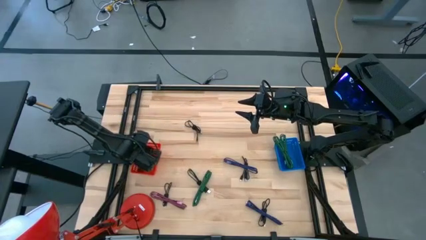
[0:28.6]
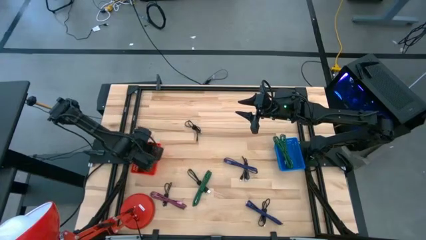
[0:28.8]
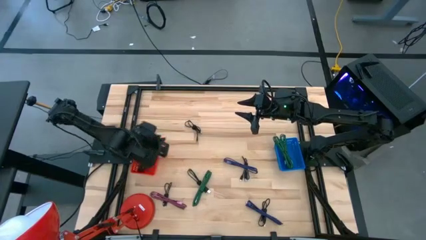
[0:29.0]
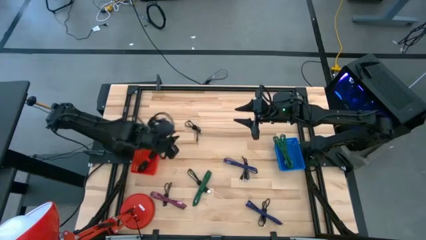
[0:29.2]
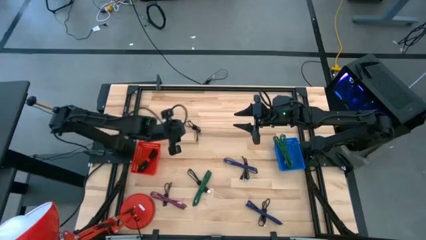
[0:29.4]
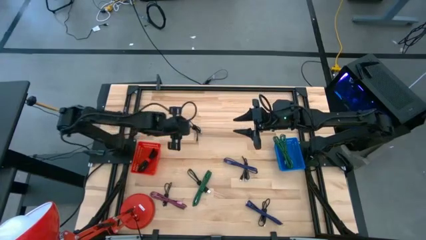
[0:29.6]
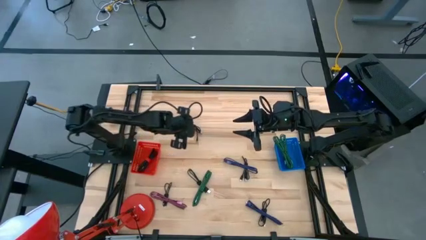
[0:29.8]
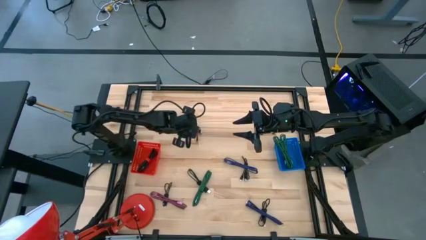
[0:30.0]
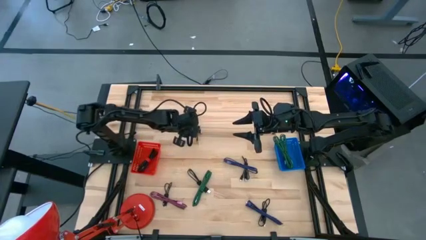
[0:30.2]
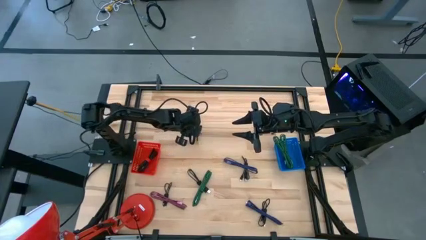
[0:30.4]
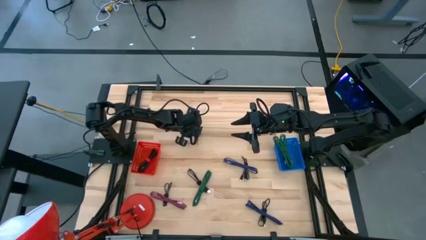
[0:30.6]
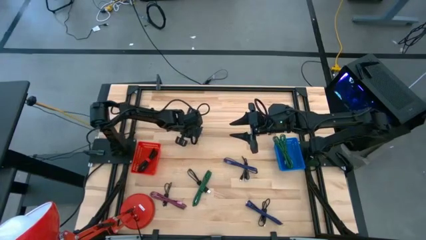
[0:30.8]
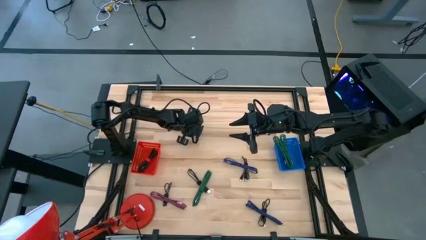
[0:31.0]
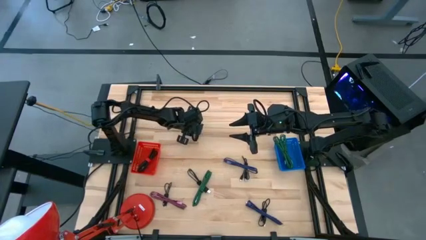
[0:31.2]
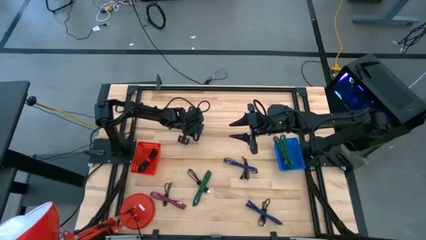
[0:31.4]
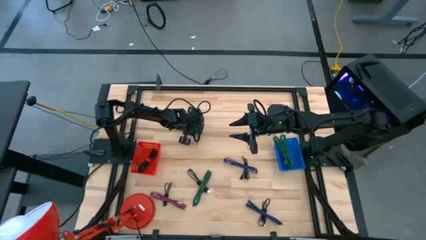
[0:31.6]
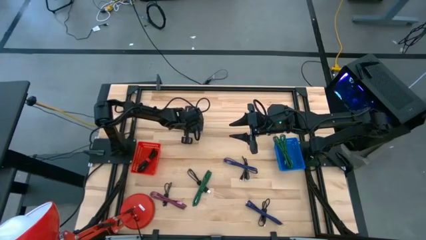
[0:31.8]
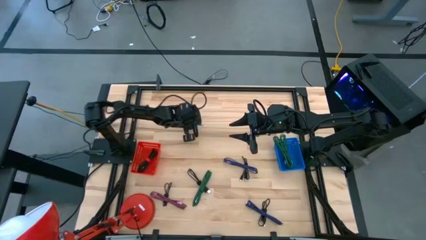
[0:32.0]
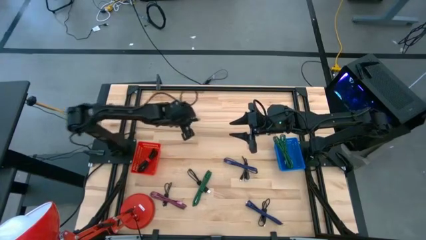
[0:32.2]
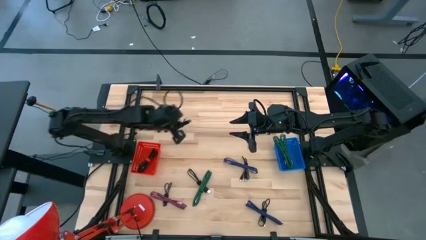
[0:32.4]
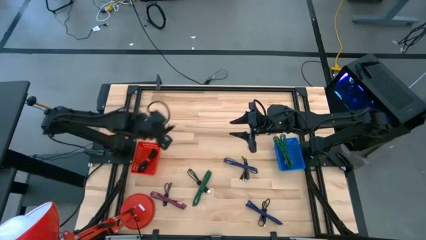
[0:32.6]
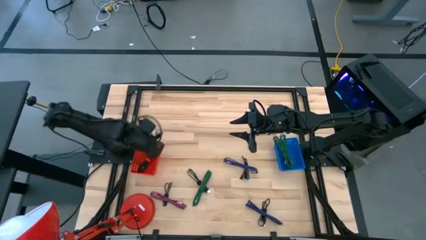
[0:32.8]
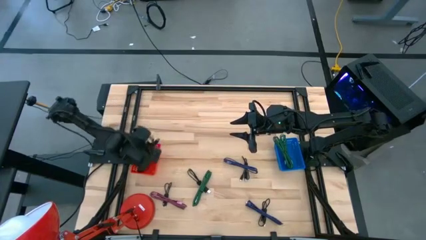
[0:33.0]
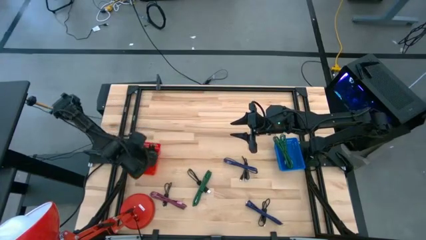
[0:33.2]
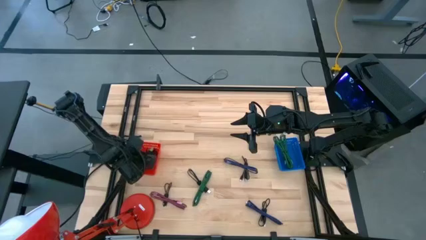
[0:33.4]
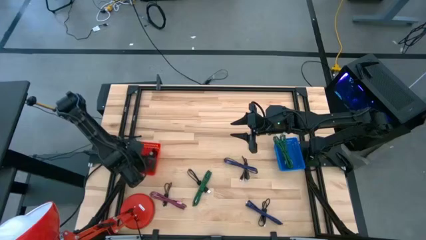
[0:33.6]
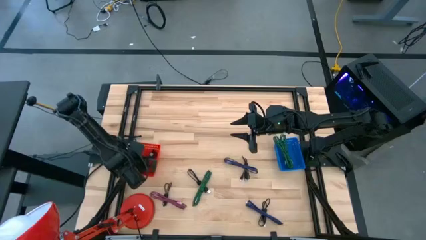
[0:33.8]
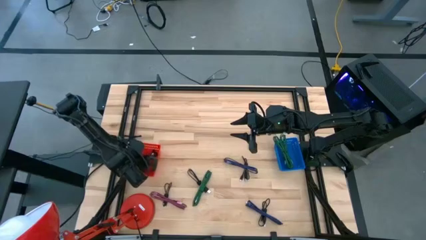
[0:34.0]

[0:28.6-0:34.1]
Task: Pick & Place USB Port
Put the black charger cable into the red bin

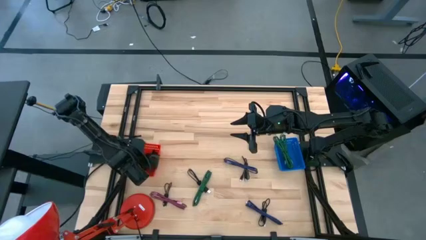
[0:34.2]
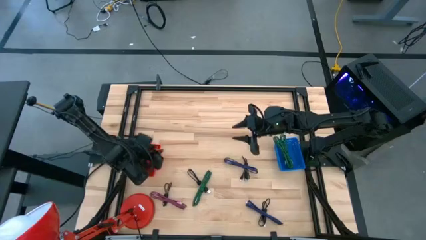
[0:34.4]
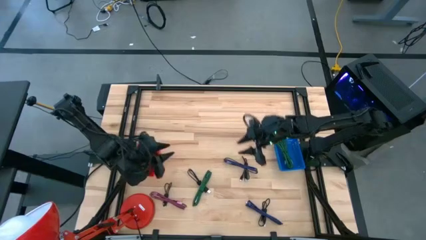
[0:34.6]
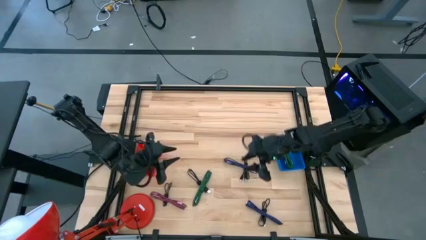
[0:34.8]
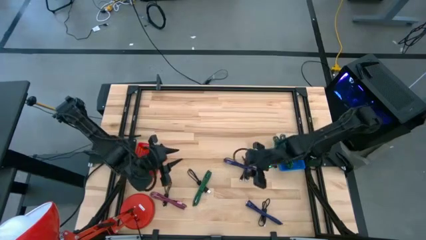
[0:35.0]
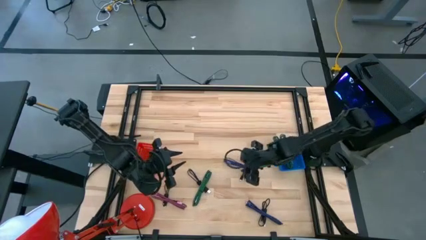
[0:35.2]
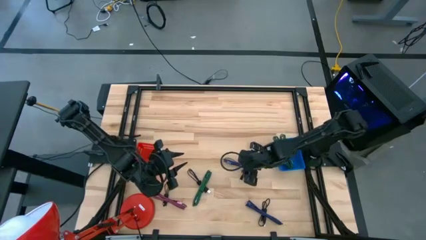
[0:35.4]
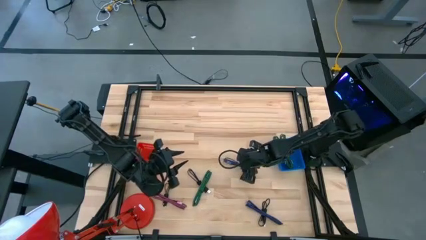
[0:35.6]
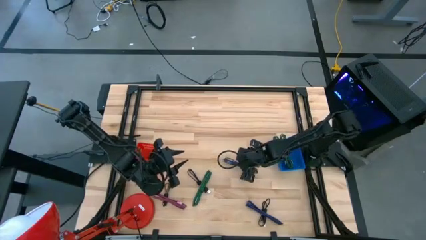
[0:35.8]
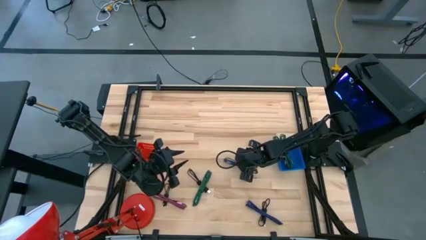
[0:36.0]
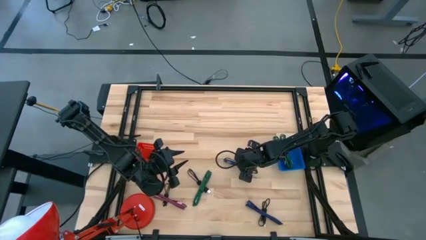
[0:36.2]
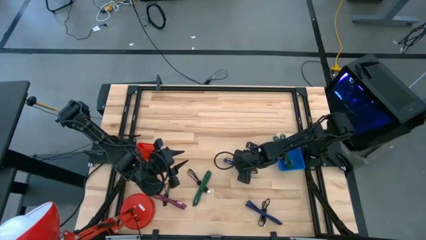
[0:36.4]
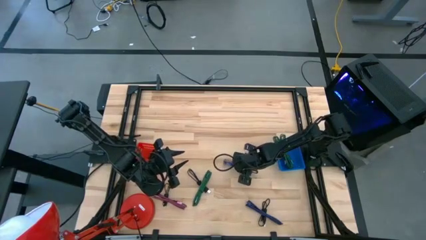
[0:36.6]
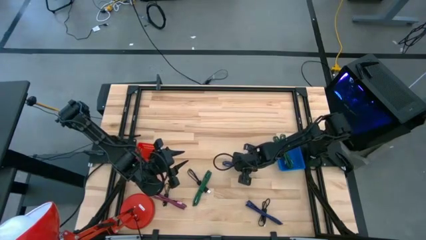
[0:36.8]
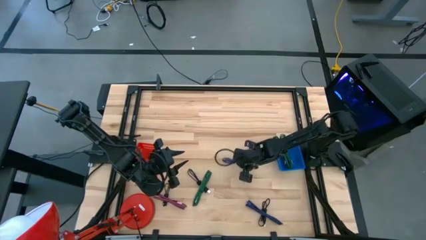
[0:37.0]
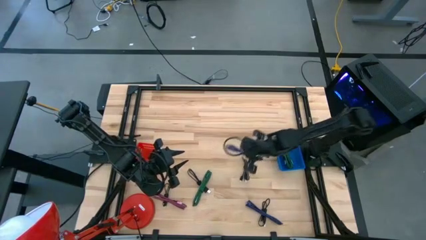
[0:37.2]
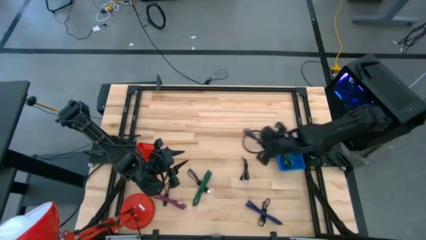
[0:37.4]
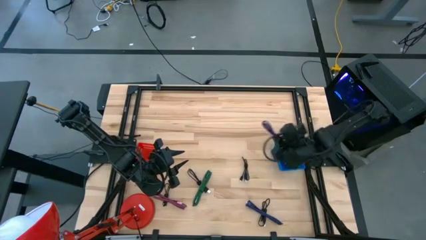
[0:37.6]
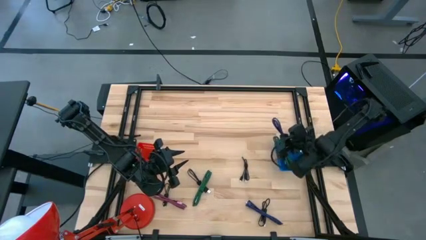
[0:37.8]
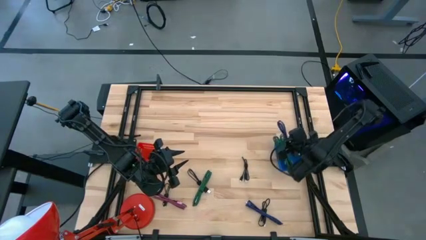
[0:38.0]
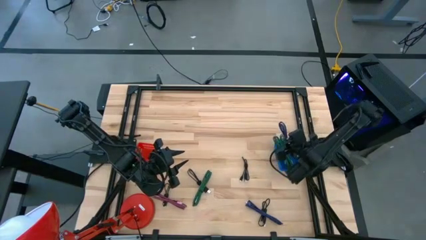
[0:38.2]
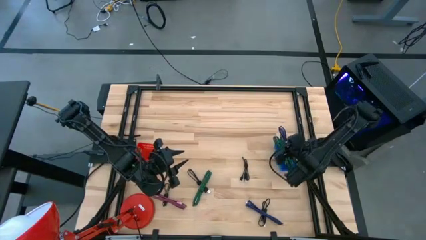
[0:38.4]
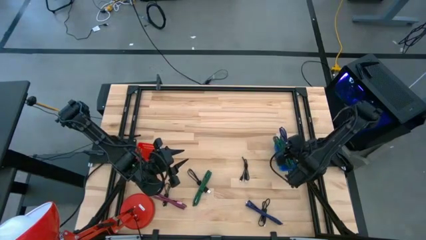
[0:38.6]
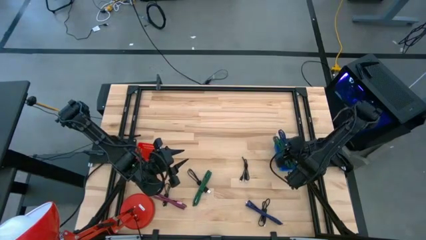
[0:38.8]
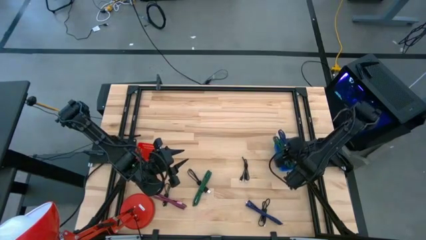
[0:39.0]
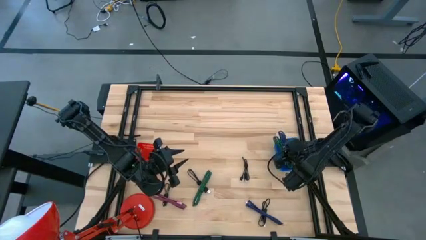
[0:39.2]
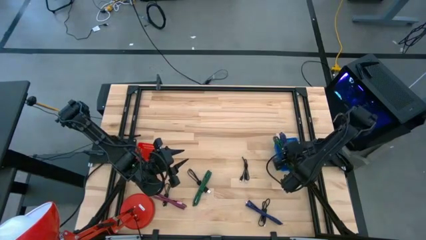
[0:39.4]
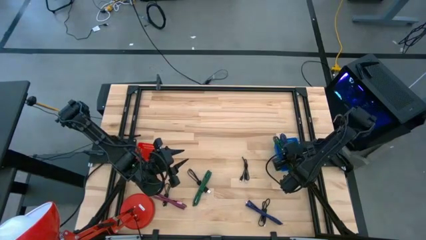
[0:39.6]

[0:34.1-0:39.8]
Put the top blue charger cable into the blue bin

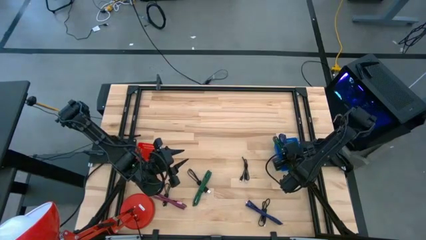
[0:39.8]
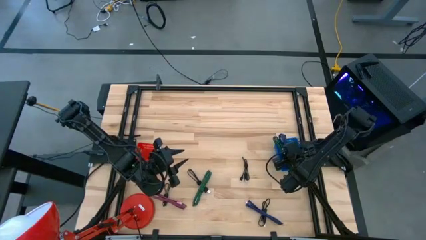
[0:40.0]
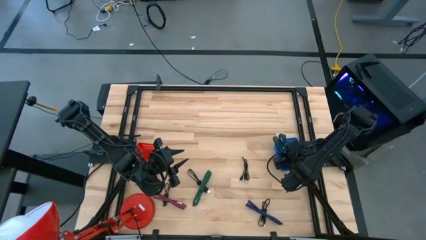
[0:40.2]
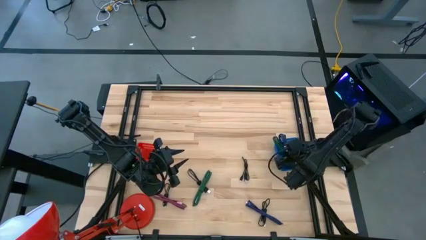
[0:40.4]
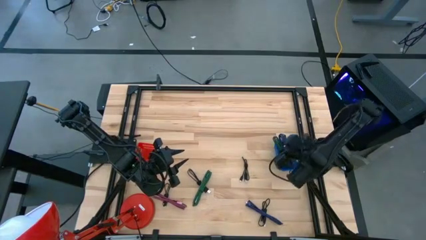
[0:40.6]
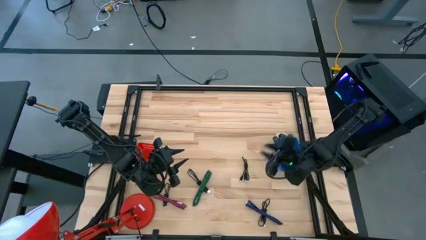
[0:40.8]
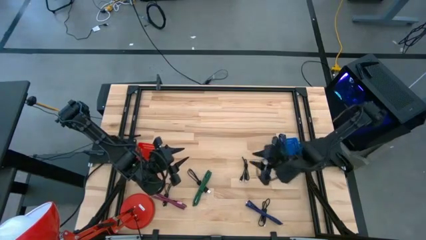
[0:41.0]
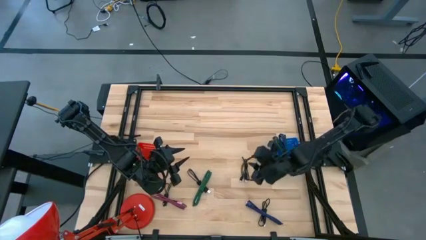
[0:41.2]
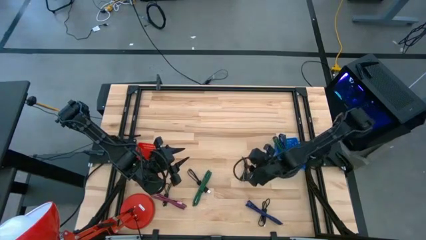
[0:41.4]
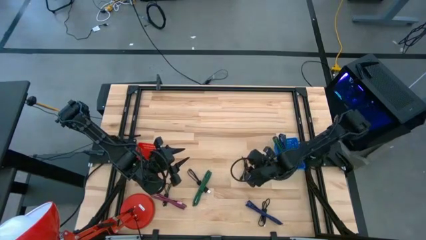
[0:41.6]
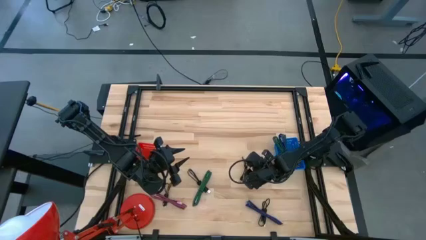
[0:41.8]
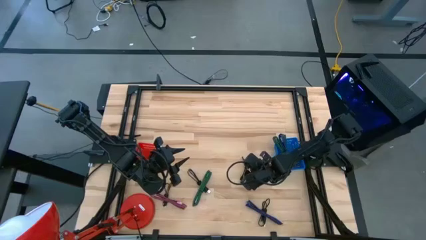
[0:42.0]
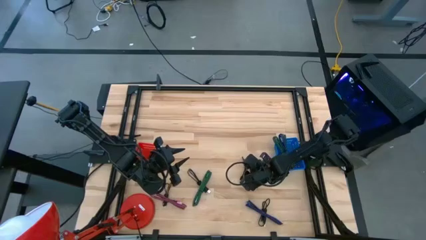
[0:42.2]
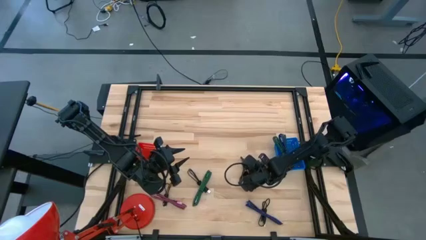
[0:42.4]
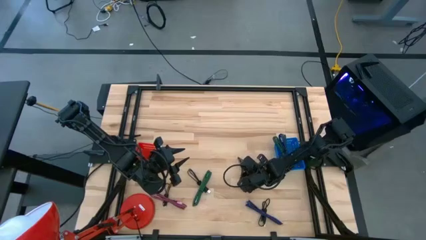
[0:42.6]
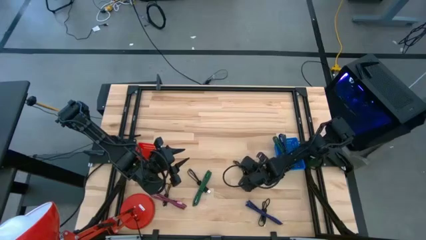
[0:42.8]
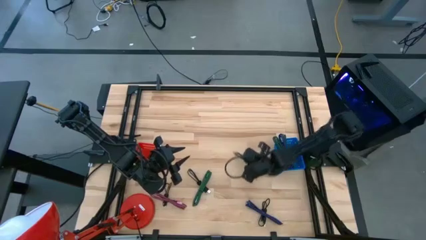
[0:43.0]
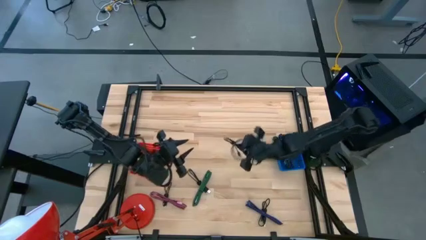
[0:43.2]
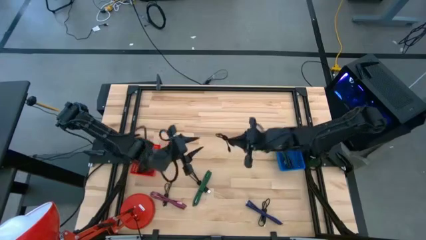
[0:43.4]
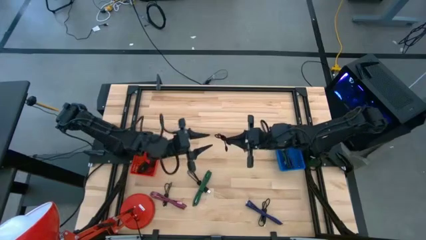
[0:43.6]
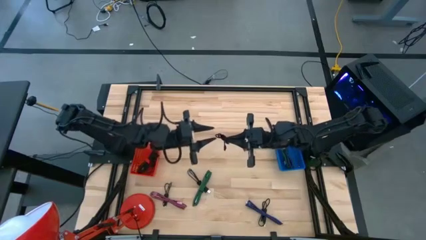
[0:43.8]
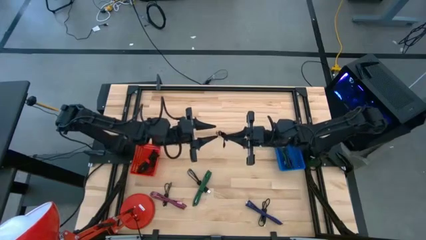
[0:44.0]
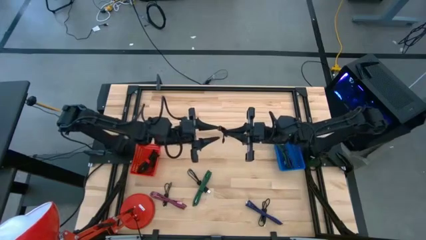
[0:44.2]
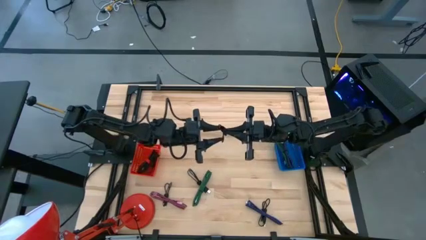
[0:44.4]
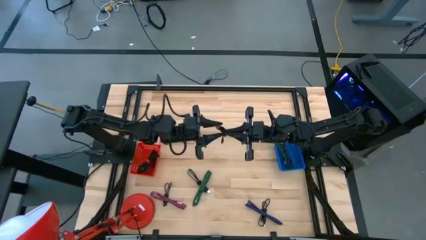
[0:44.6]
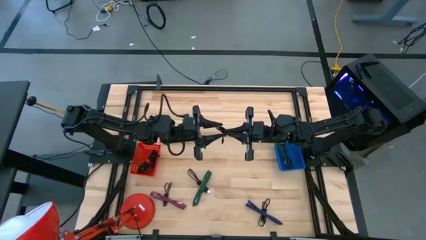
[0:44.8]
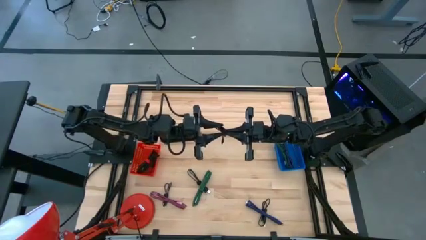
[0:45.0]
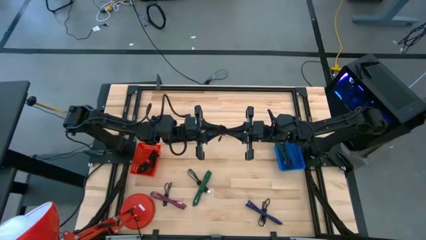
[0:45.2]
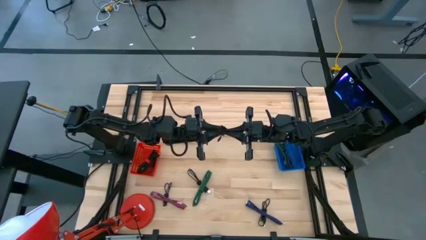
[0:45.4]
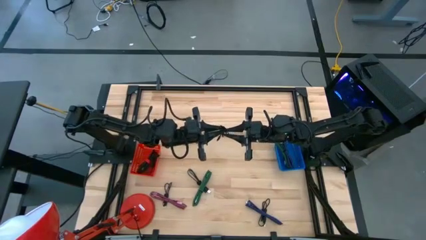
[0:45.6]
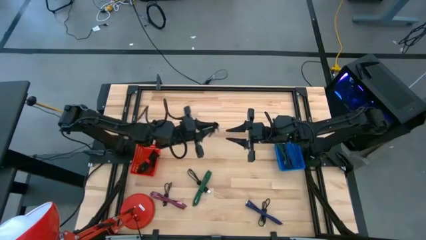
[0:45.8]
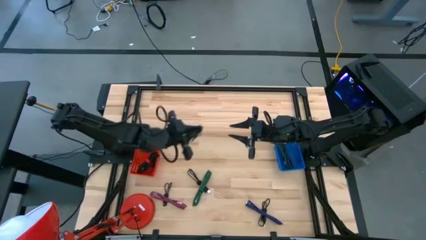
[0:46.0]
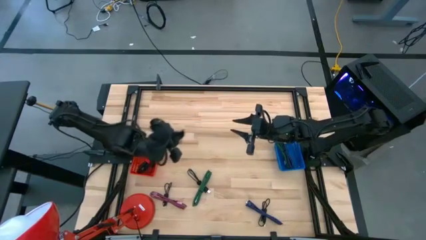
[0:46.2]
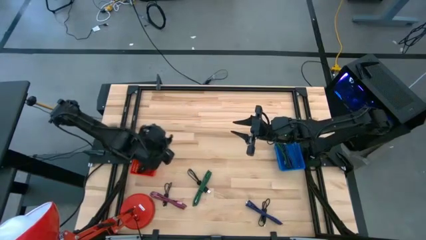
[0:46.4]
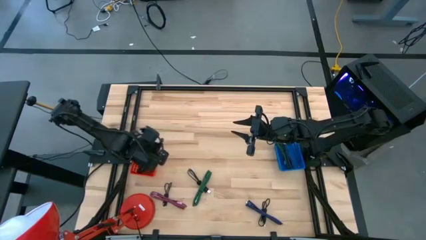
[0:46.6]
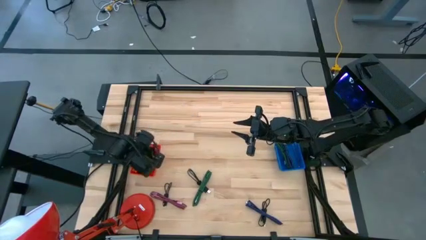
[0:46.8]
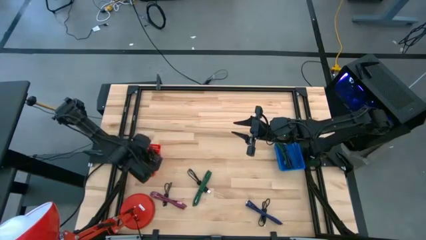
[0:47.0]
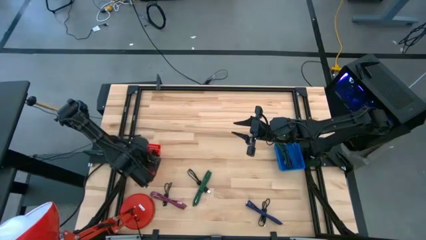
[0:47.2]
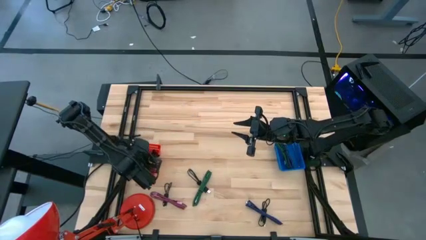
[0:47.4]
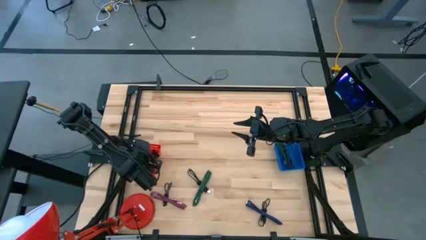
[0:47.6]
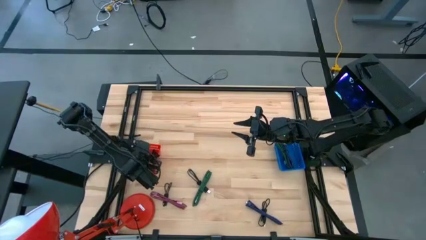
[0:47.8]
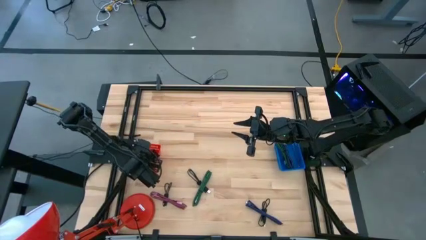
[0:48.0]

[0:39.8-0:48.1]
Put the black charger cable into the red bin
